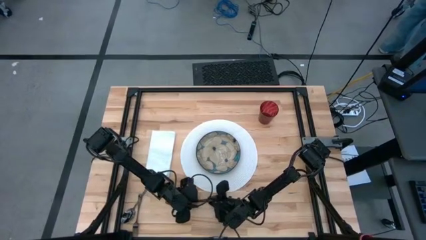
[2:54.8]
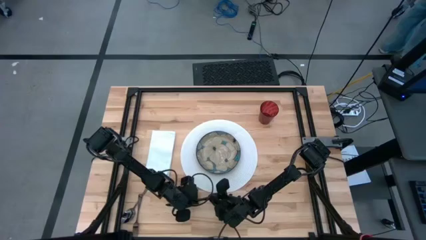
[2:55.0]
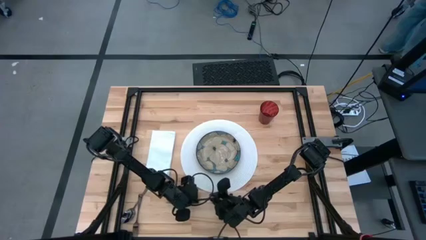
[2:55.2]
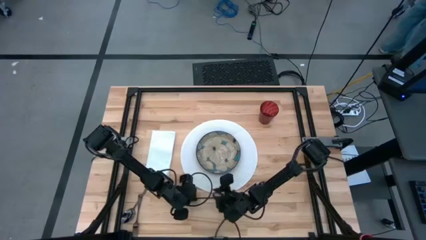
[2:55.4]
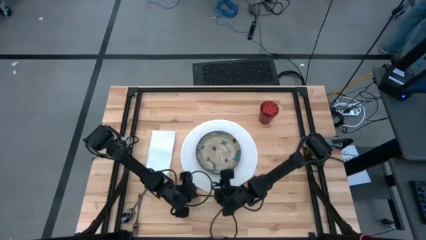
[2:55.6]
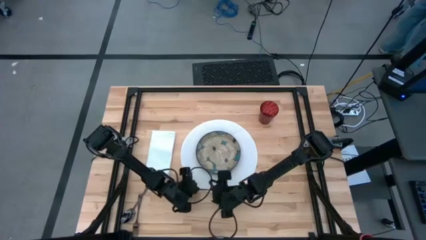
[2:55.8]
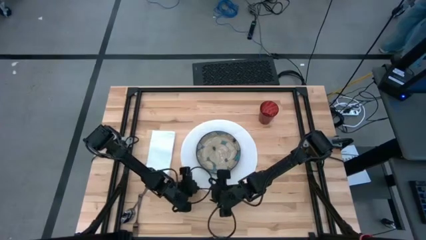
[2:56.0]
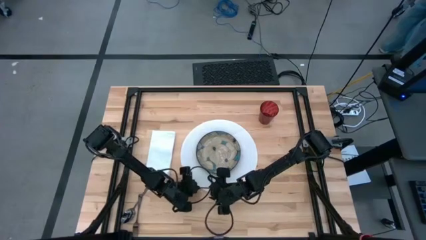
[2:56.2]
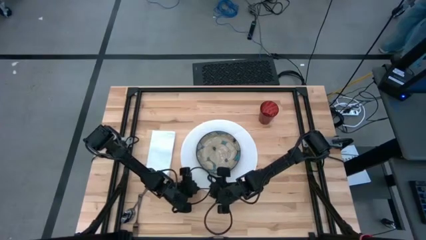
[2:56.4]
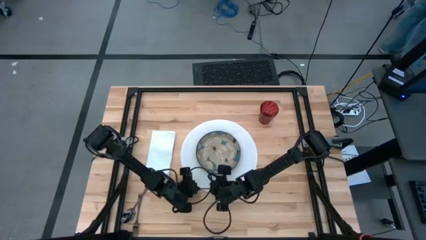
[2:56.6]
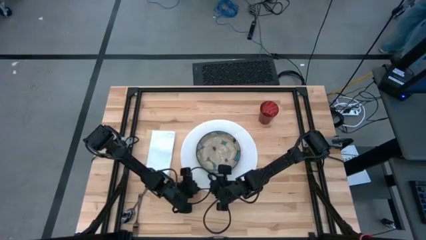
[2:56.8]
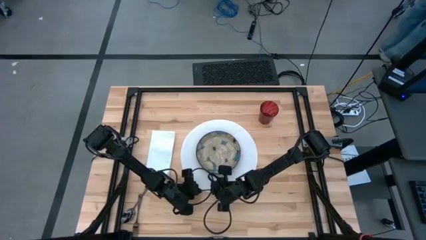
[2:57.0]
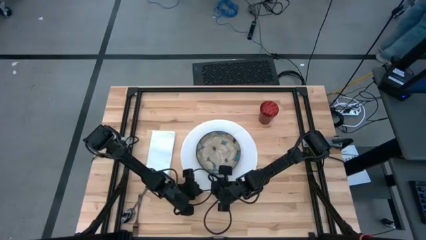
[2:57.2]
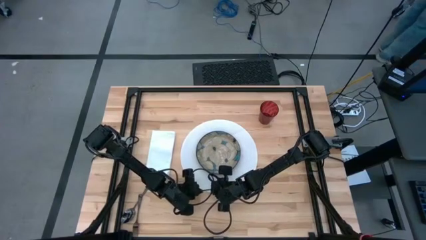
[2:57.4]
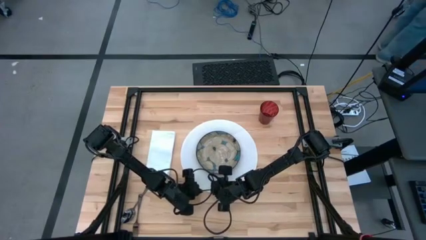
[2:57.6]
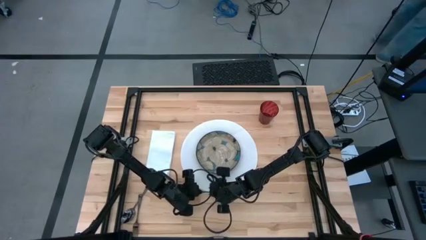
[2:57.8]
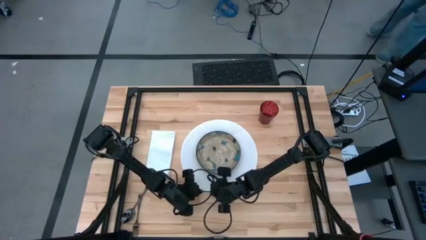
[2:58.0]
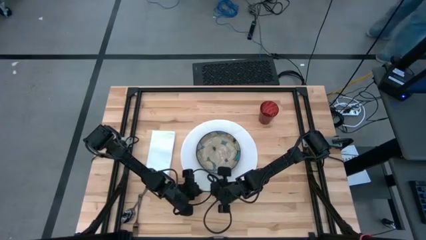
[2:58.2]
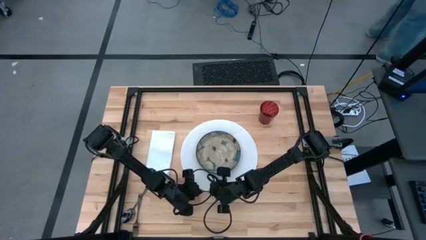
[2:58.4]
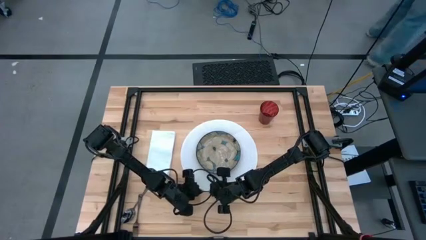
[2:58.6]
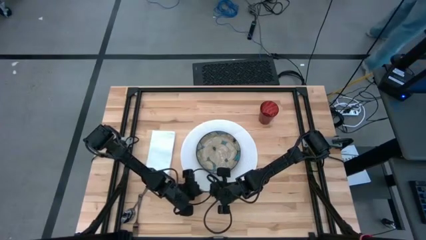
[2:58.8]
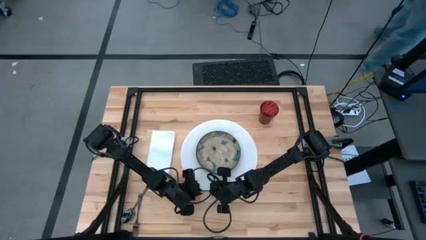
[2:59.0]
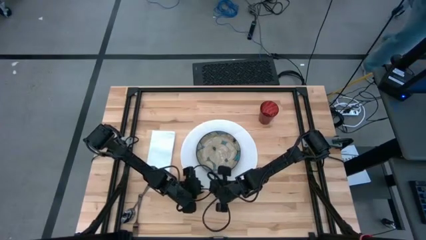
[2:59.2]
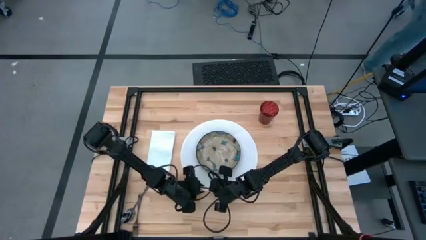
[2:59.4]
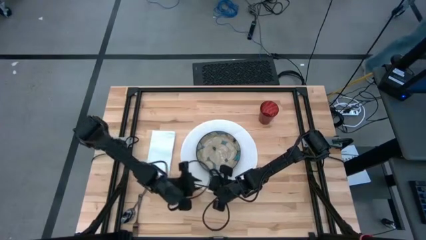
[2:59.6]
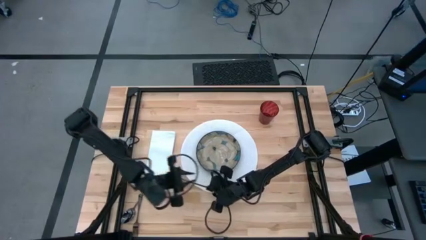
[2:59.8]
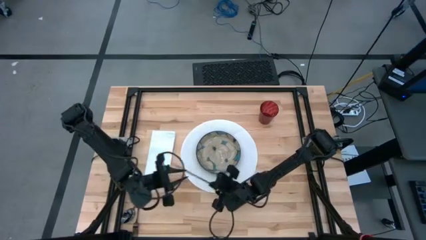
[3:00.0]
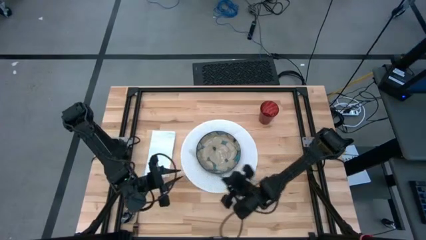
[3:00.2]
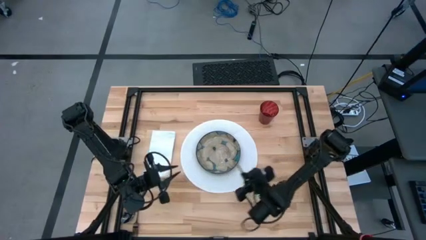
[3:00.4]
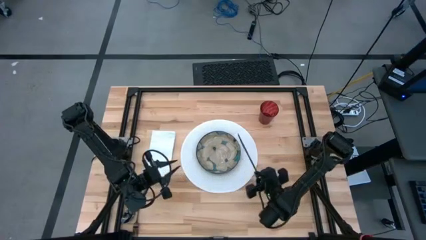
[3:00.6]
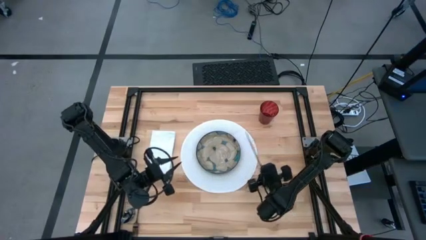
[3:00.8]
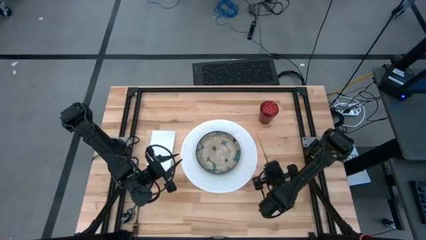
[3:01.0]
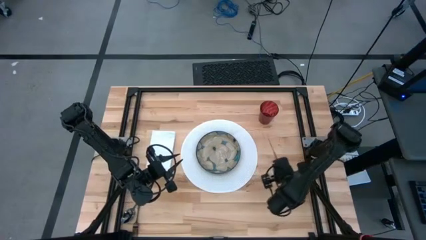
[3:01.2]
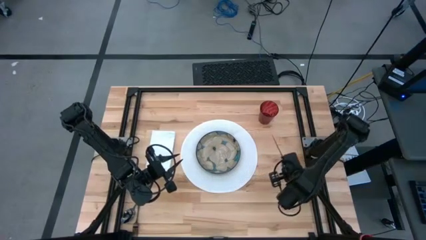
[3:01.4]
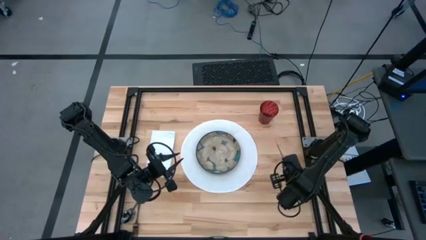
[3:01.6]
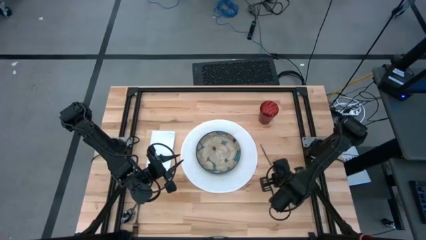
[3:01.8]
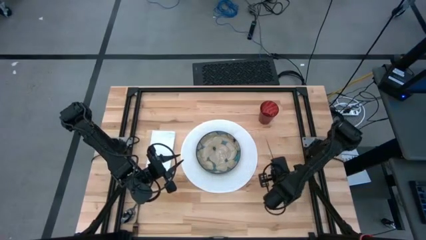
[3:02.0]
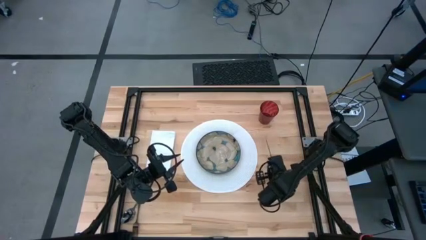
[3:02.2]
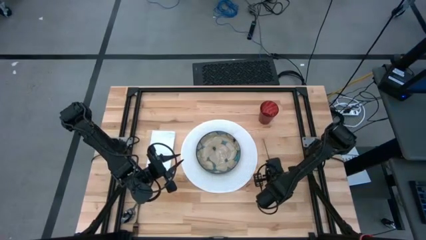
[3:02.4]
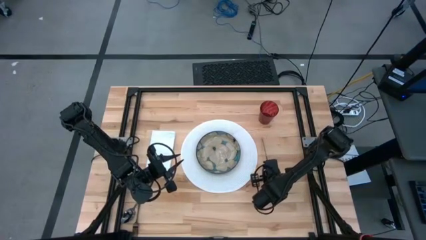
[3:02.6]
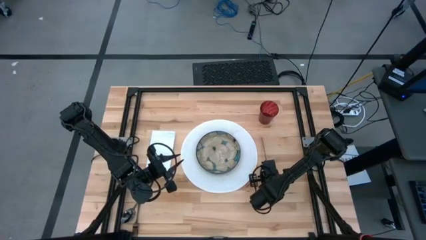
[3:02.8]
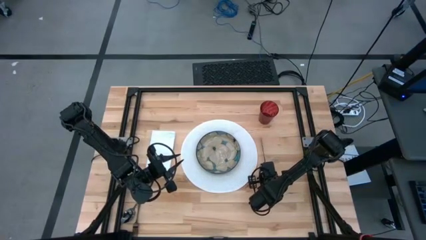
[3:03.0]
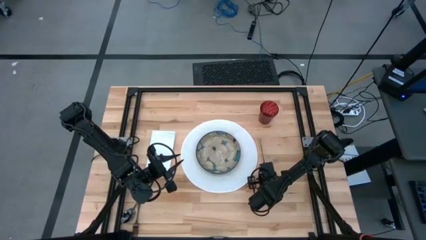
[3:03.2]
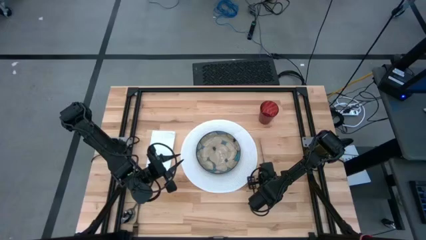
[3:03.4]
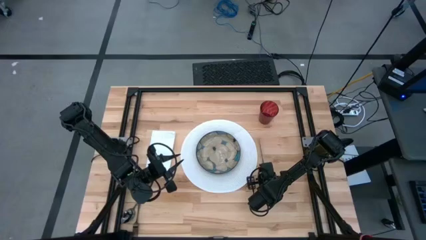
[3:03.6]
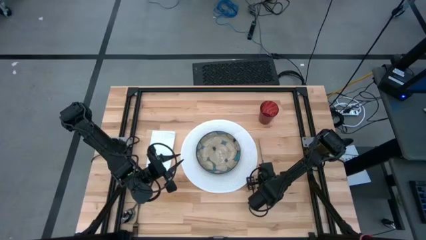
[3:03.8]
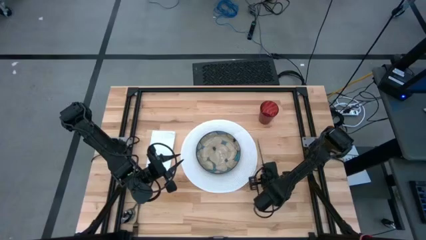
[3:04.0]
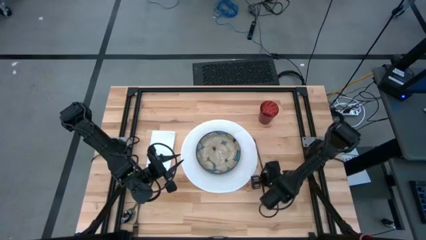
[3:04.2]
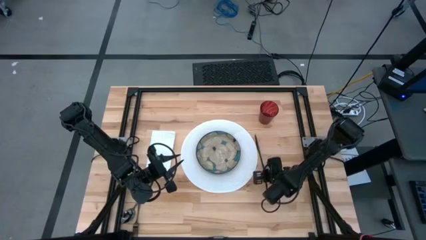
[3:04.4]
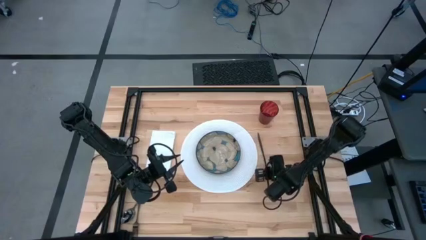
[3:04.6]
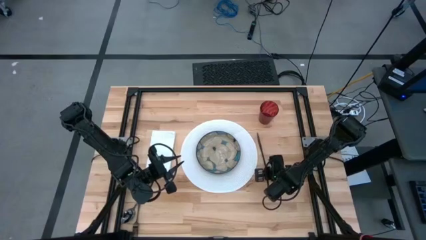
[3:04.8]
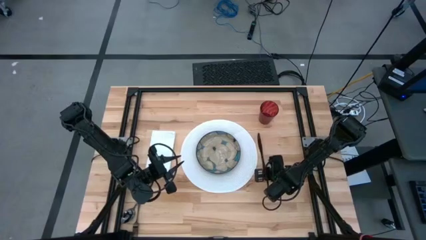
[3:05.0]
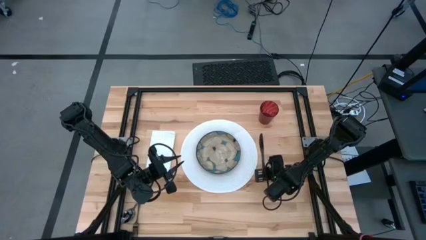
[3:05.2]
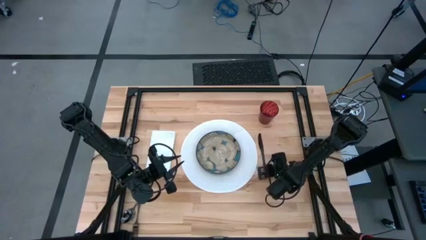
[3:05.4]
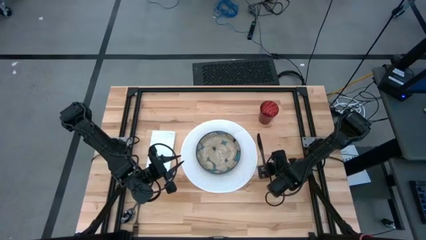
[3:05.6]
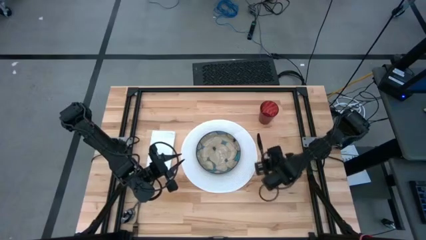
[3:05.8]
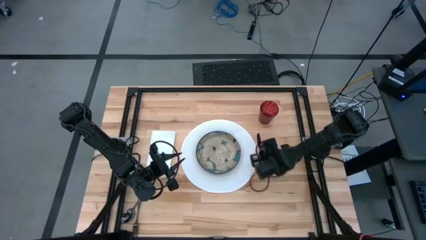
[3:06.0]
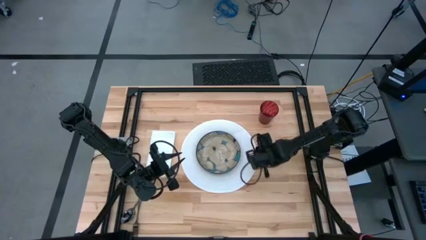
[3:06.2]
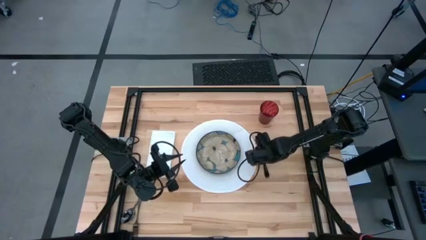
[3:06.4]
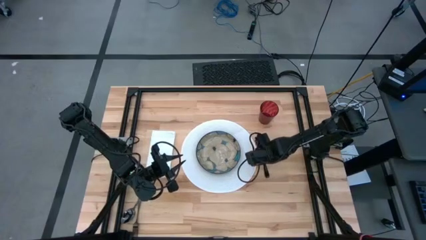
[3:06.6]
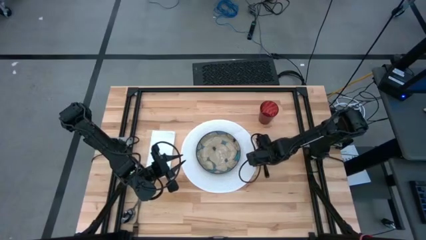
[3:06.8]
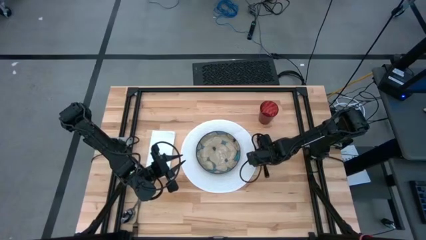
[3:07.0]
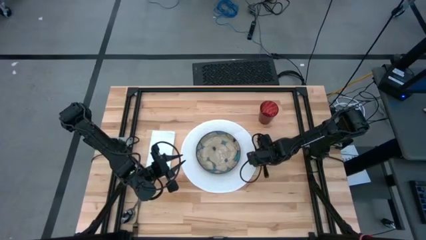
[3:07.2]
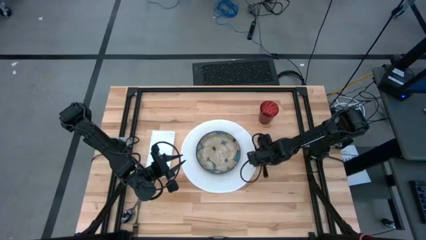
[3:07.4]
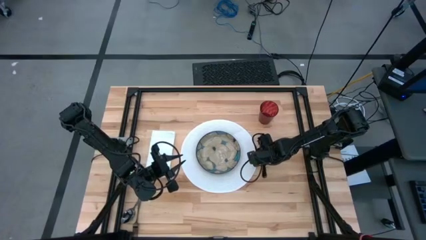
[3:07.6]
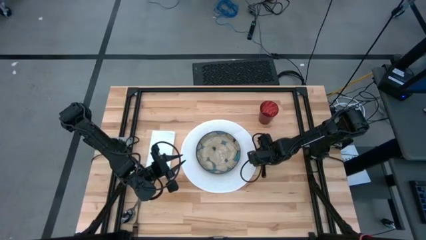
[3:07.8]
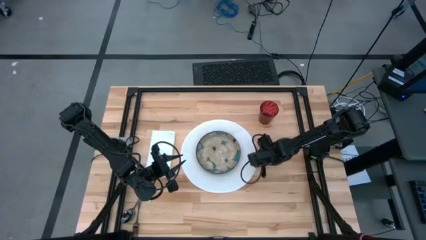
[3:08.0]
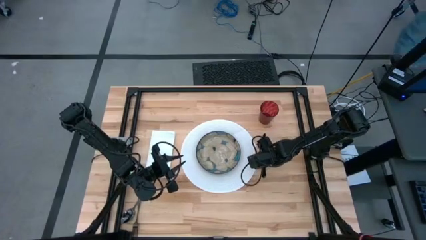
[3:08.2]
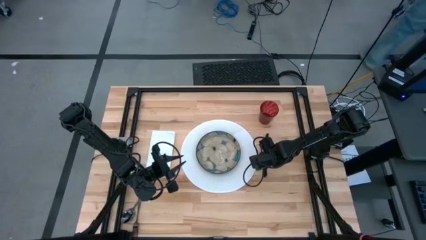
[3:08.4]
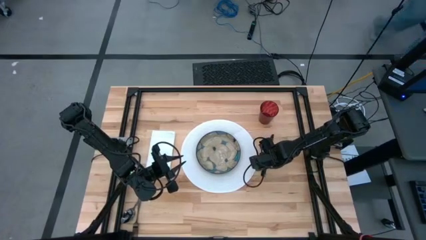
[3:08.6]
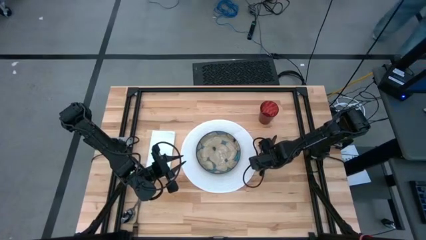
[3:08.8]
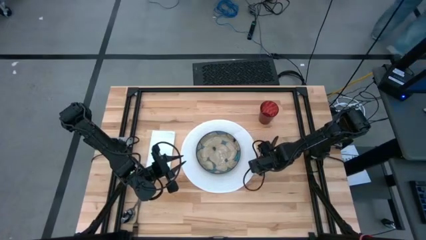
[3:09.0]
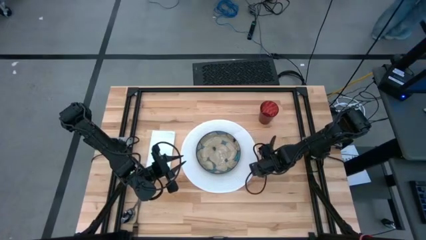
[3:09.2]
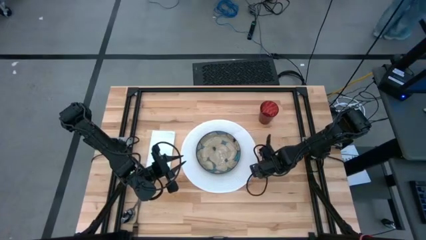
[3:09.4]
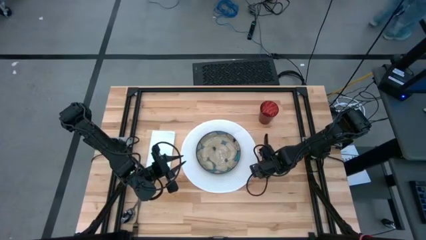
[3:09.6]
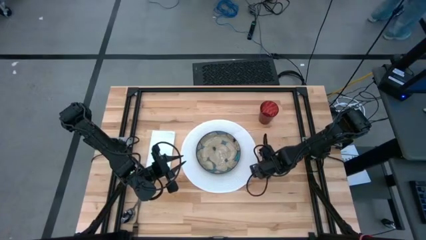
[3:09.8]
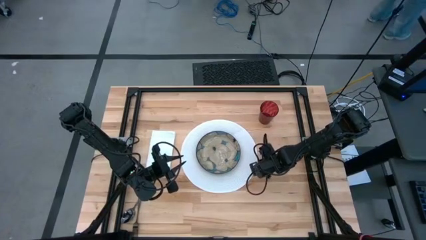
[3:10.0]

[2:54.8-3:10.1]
Task: Set table place
Put the black knife to the right of the white placemat
